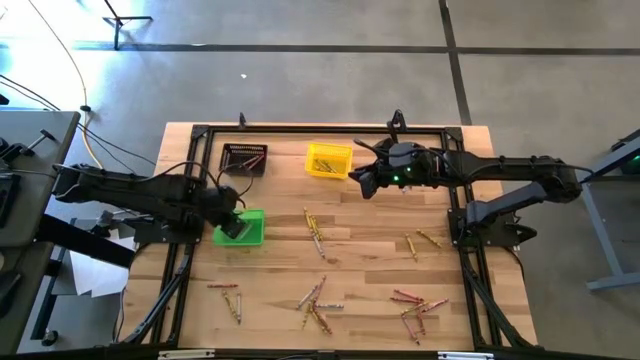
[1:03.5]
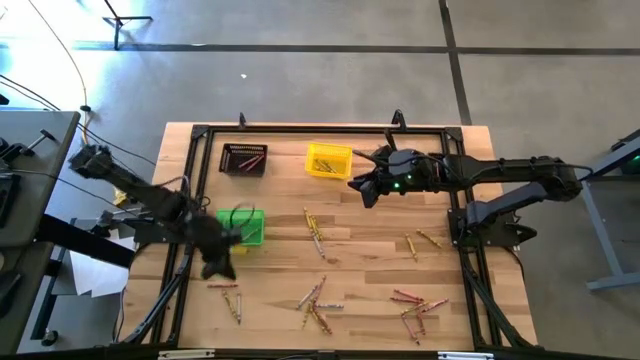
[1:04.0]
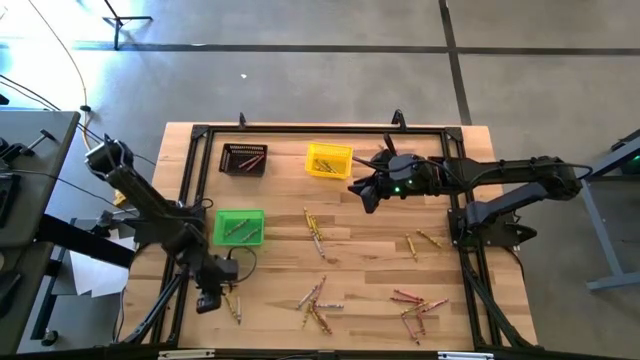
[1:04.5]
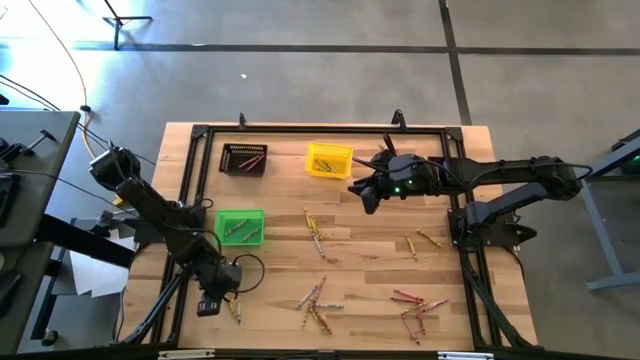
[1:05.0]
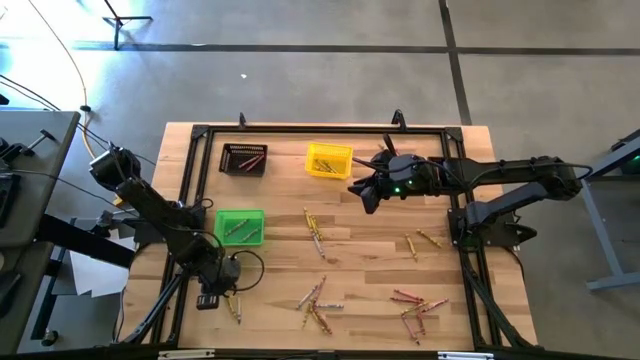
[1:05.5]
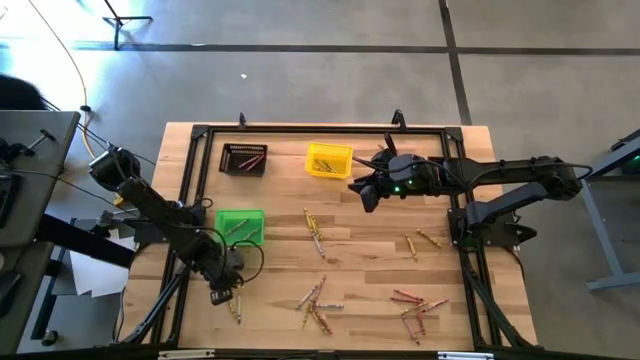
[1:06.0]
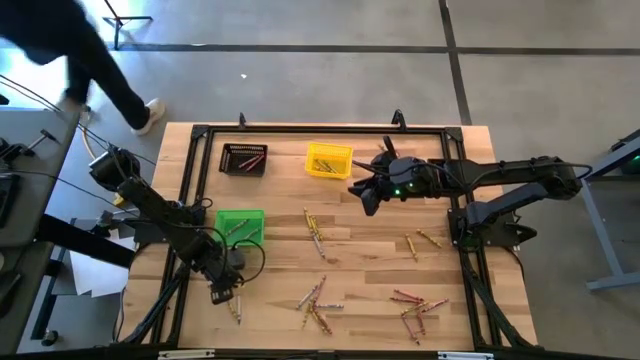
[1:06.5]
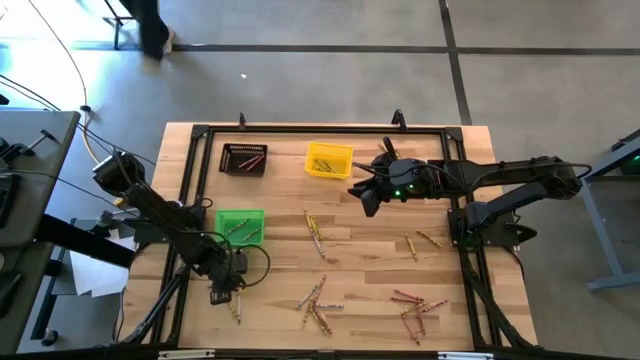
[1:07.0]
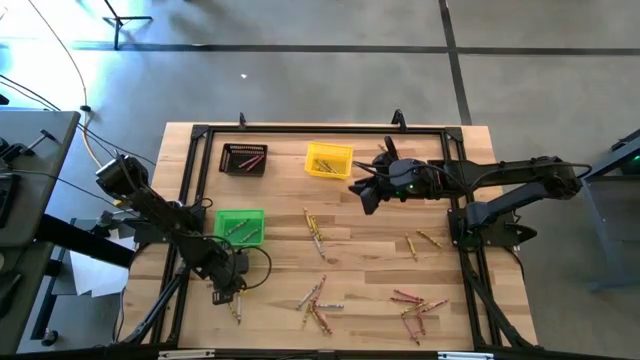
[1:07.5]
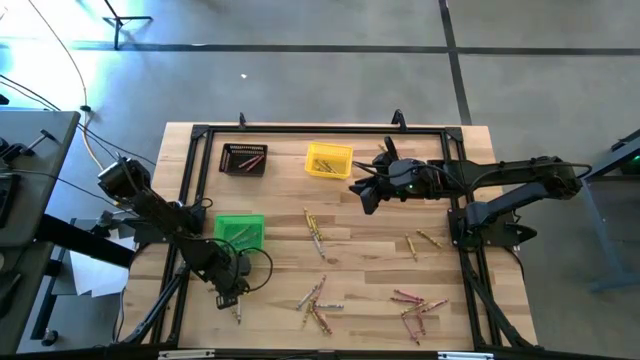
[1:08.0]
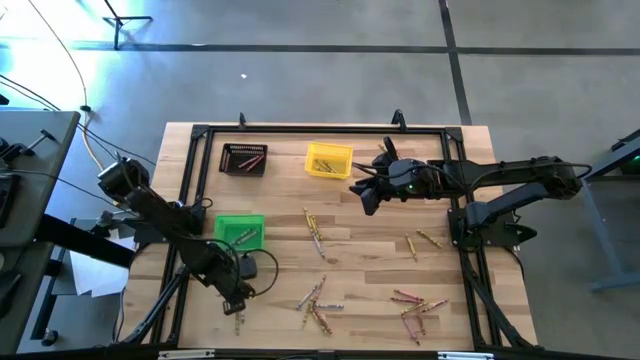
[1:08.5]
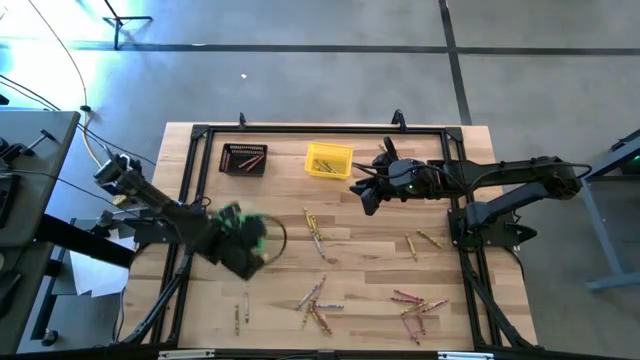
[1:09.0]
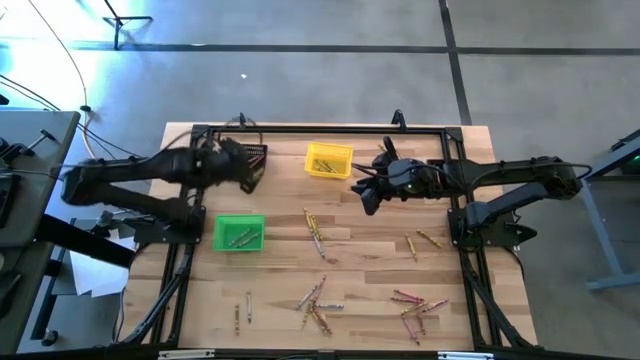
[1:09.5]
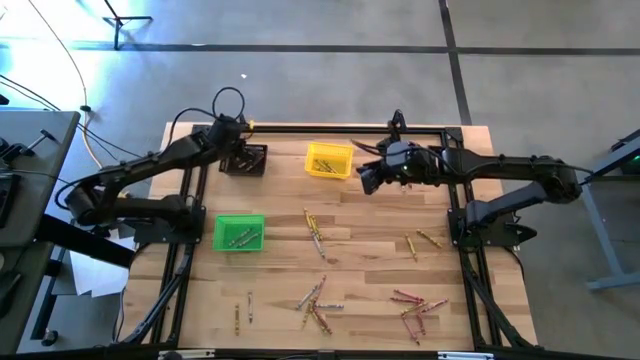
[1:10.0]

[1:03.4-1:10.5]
Task: Sort crayons
Put the red crayon into the black bin

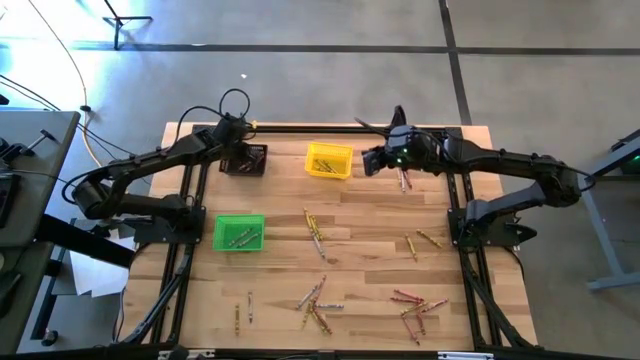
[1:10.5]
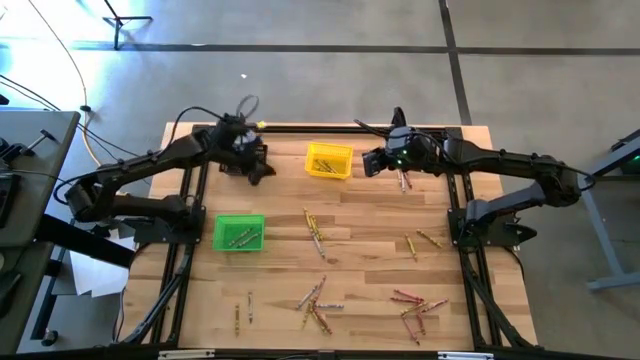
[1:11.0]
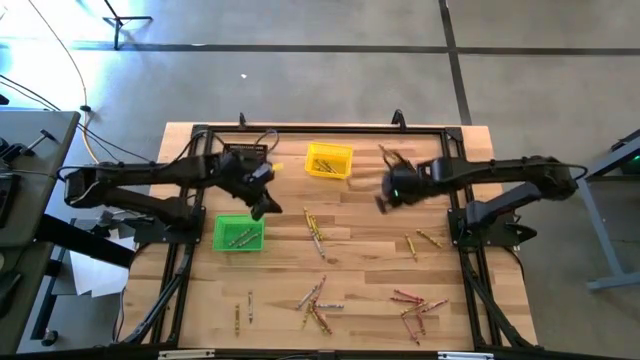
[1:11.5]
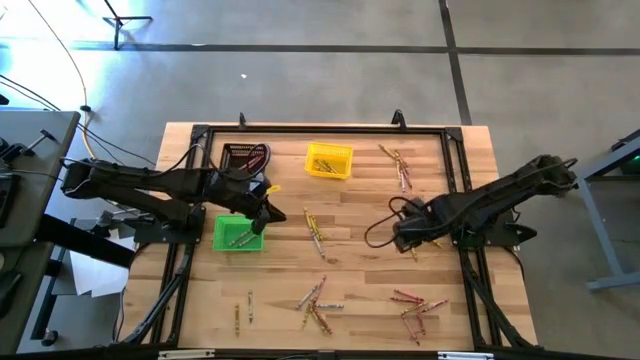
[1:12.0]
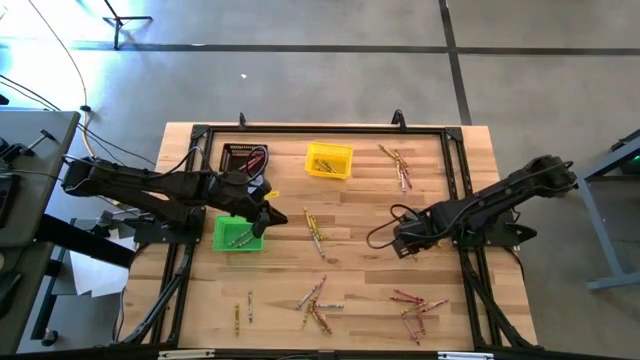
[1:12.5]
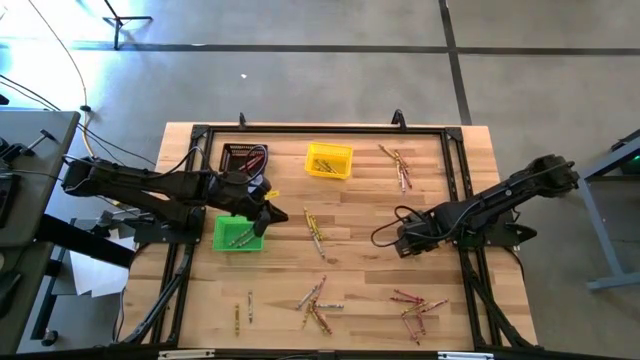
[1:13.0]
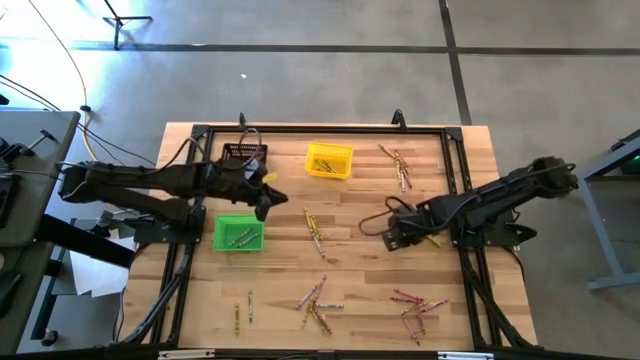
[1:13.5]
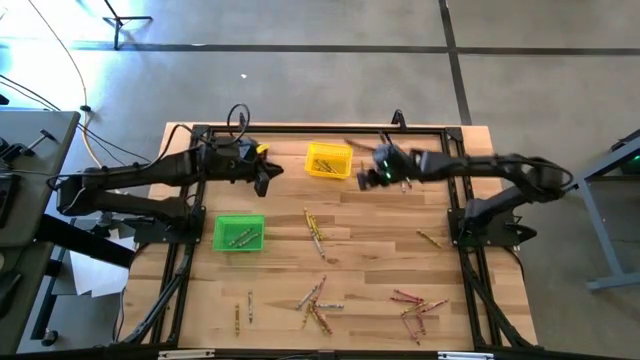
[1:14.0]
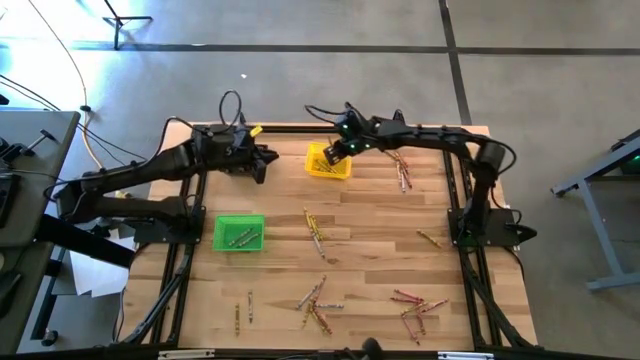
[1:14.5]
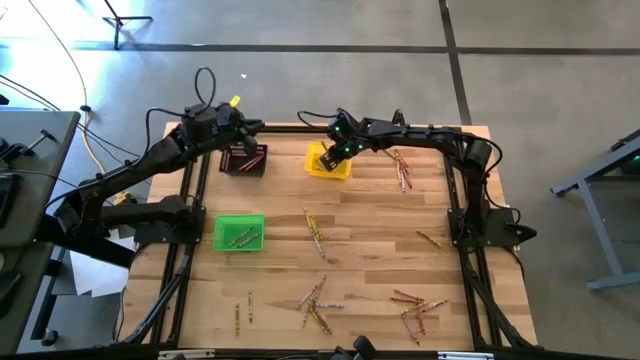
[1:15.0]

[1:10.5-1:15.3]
Put the yellow crayon into the yellow bin

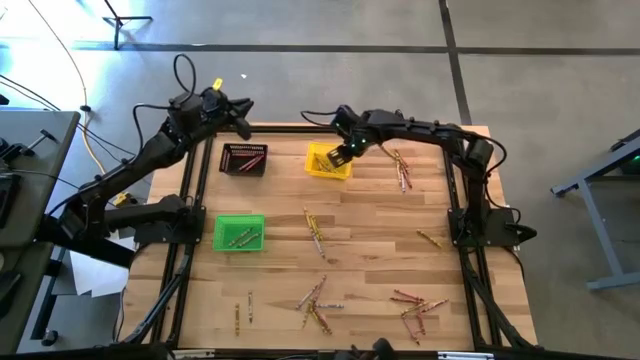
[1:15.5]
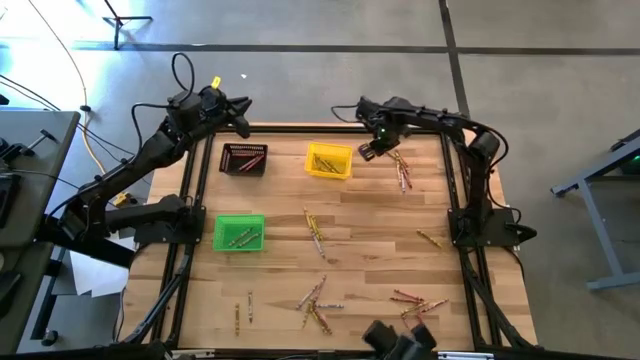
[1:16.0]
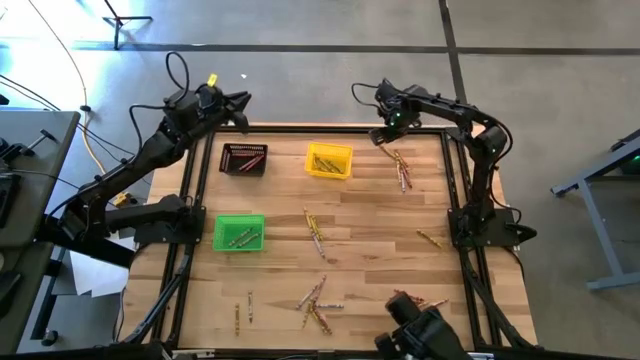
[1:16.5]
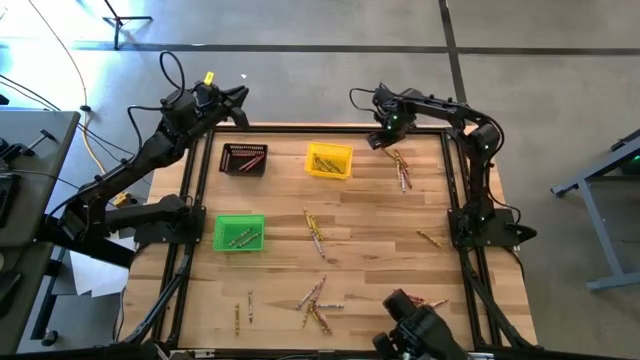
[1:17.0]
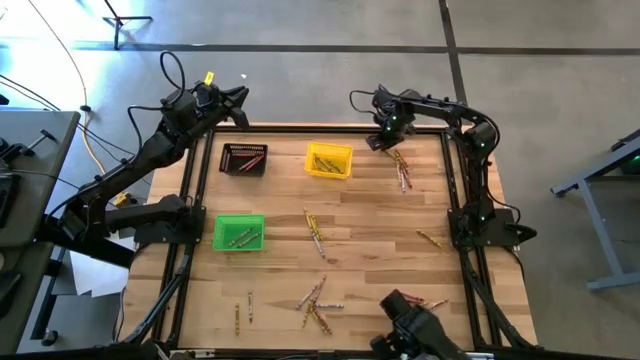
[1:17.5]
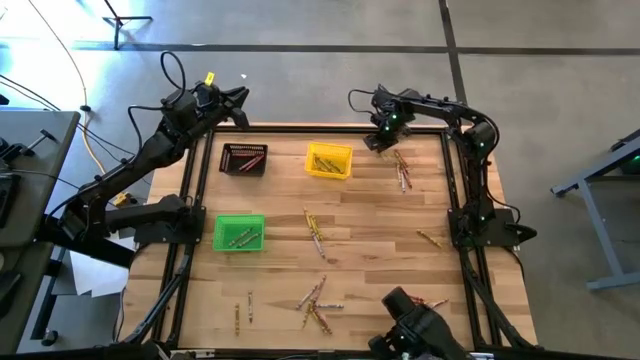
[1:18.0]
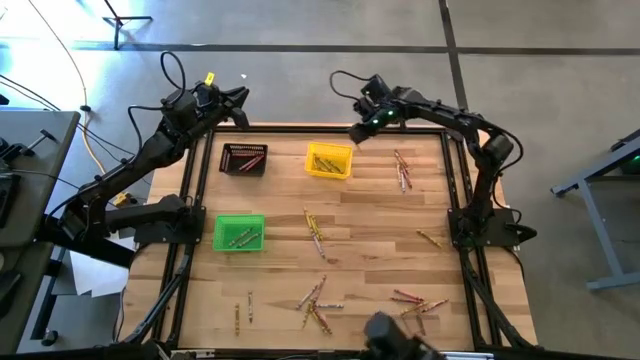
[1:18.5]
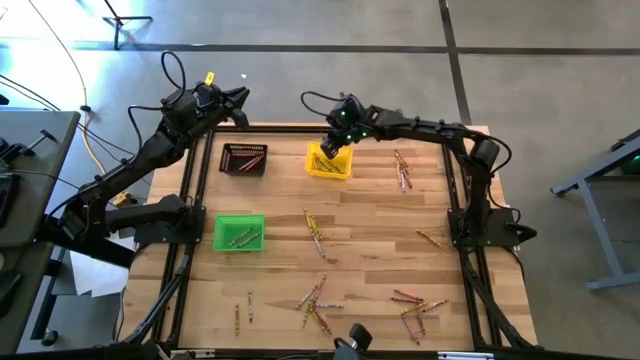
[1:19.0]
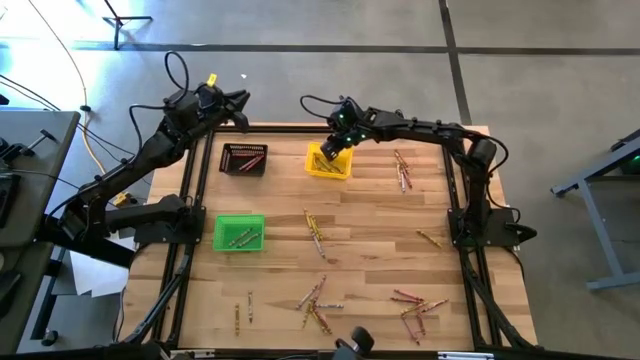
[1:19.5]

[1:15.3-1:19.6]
Put the yellow crayon into the yellow bin

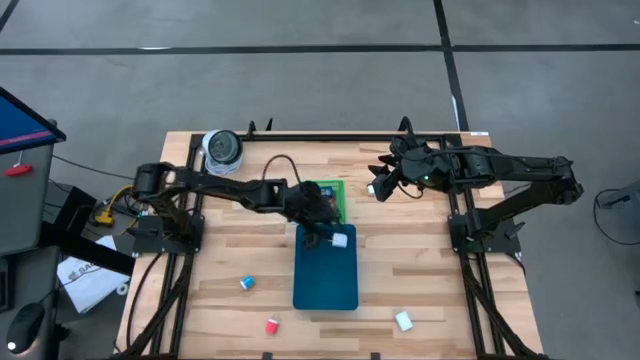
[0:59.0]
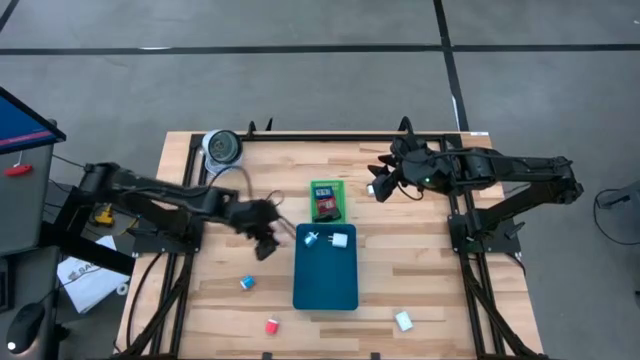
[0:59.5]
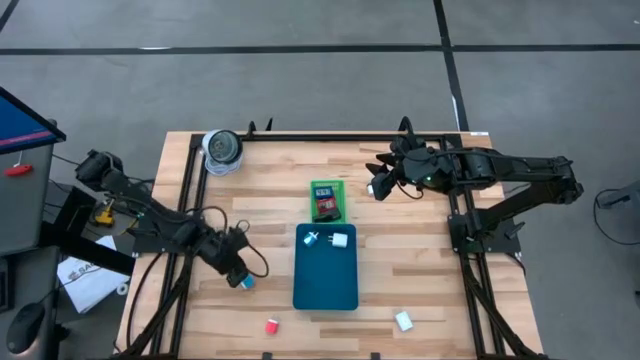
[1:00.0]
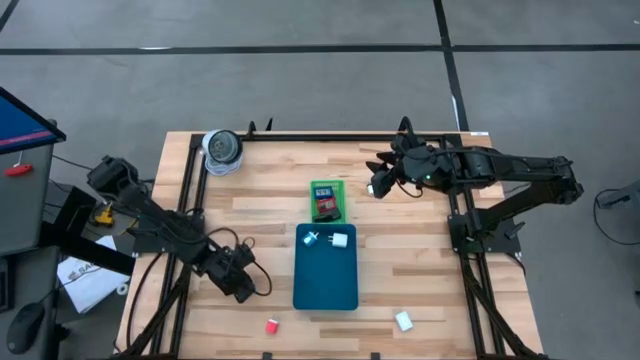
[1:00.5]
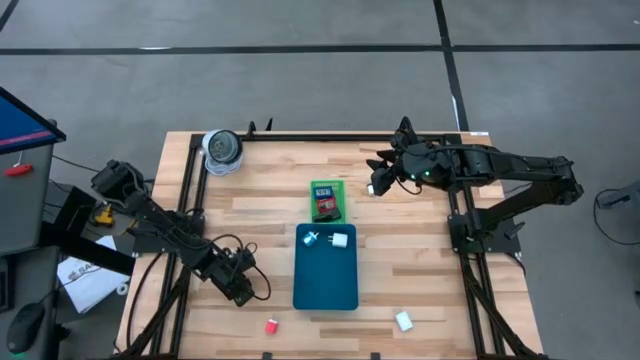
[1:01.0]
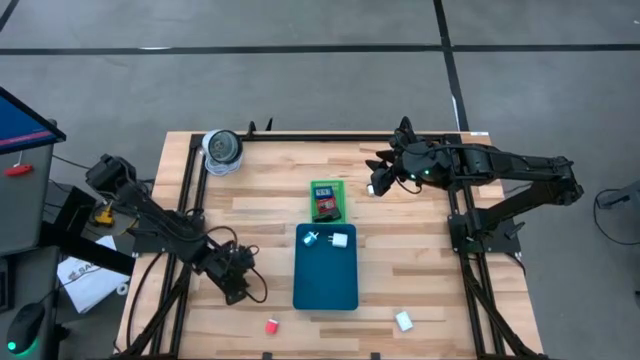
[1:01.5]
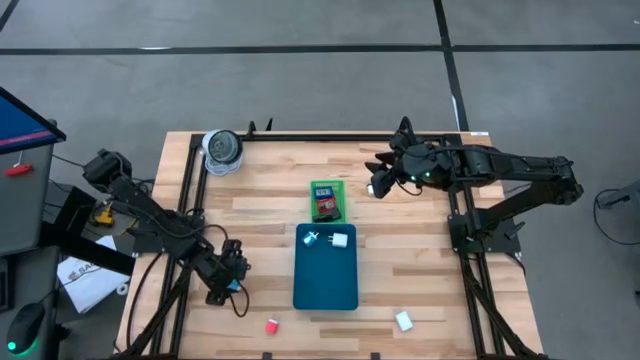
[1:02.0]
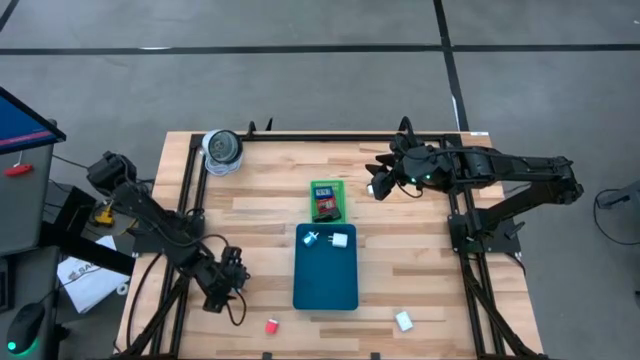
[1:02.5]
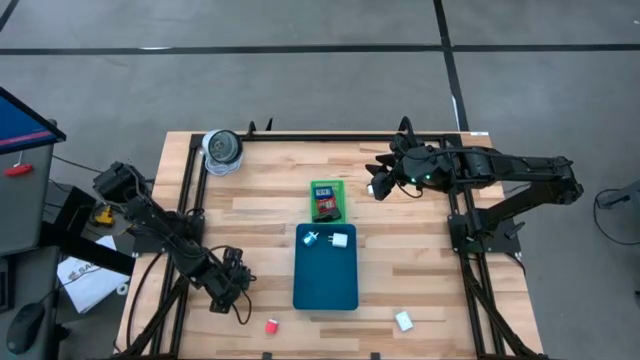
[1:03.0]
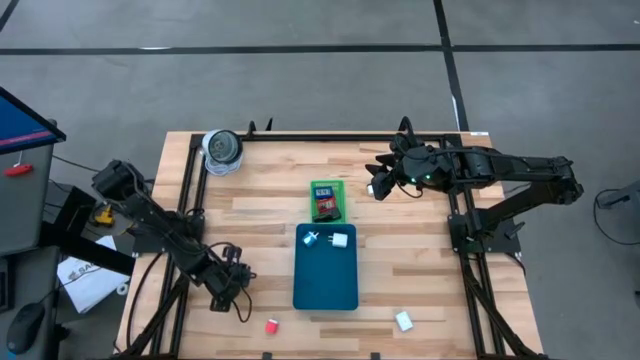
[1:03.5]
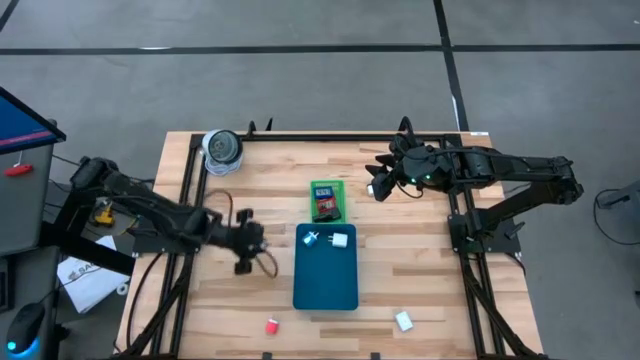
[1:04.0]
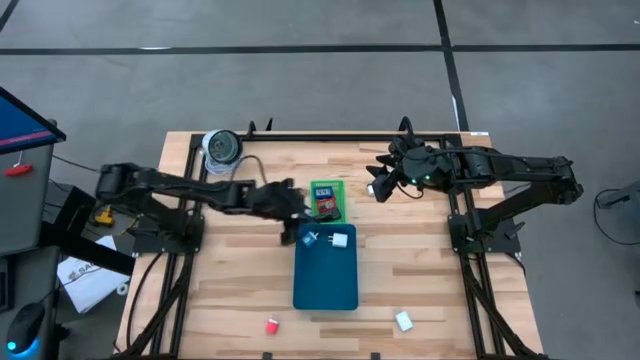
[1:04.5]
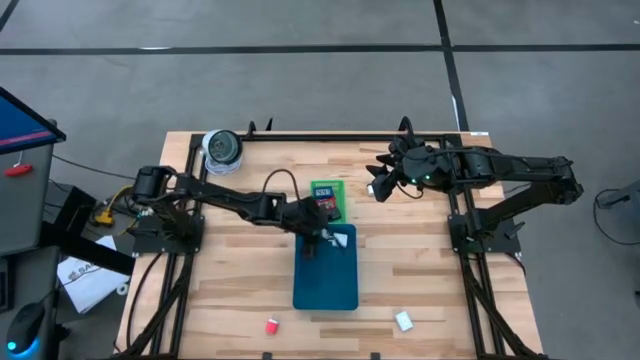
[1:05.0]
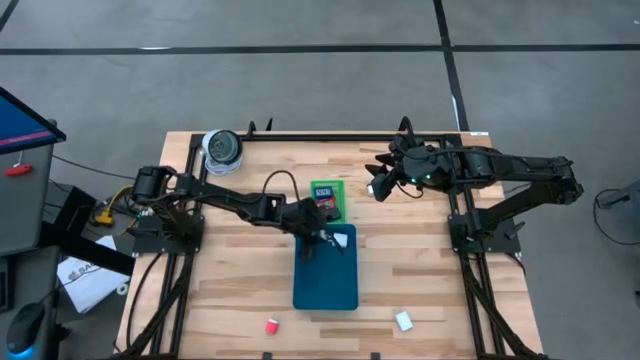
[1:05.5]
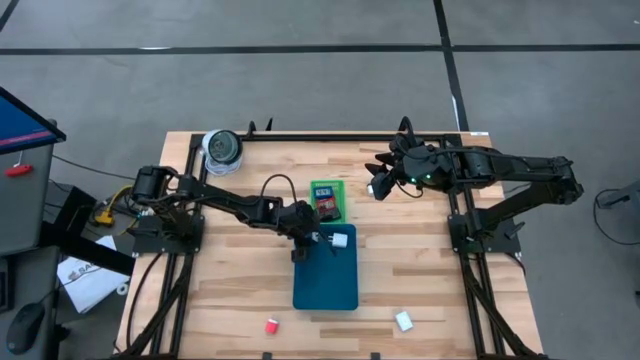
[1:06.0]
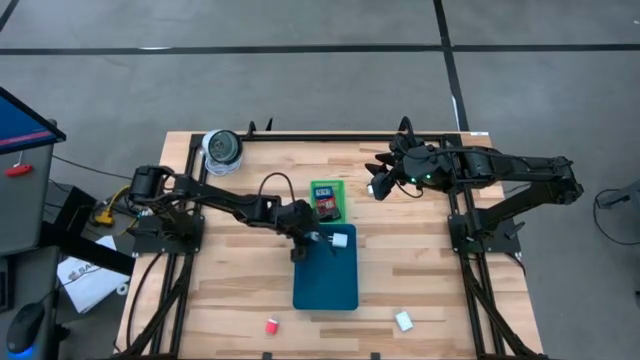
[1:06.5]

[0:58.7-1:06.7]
Task: Pick & Place Office items
Put the blue charger adapter into the blue bin
